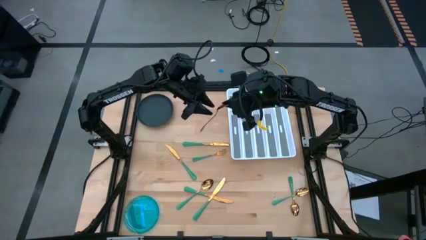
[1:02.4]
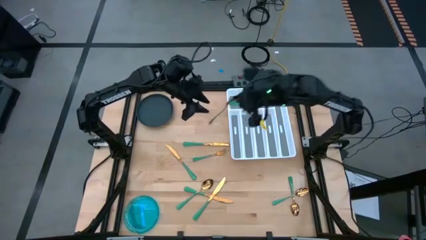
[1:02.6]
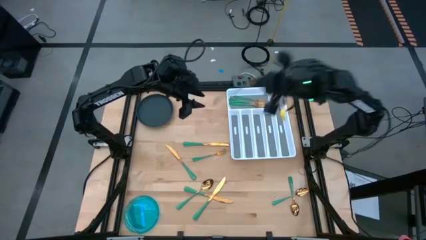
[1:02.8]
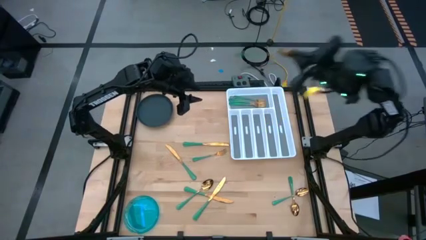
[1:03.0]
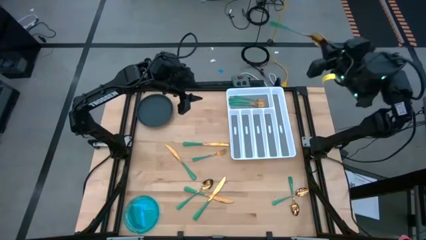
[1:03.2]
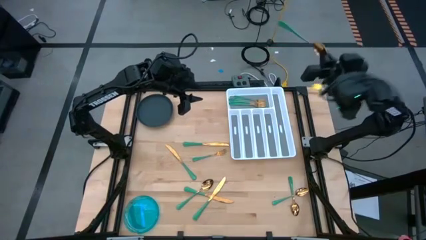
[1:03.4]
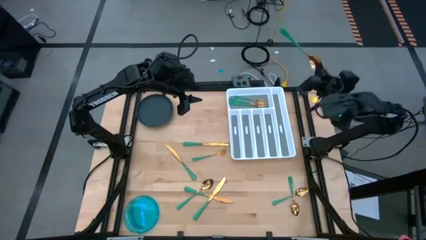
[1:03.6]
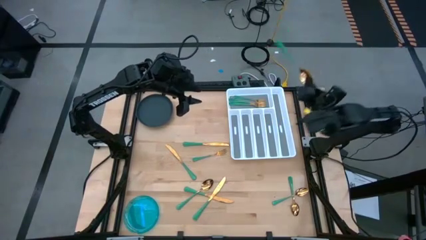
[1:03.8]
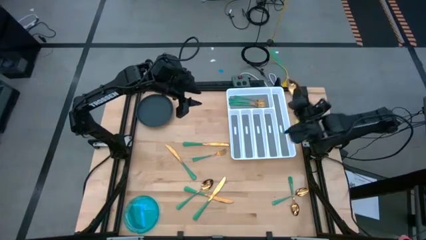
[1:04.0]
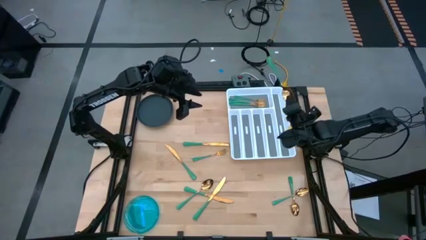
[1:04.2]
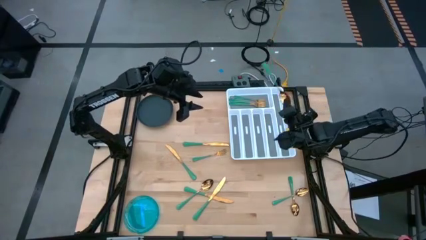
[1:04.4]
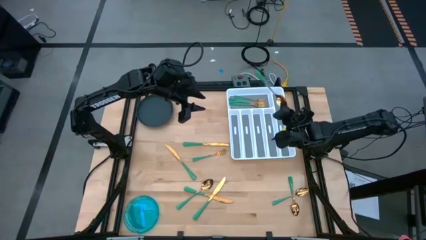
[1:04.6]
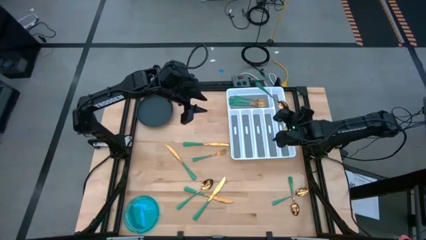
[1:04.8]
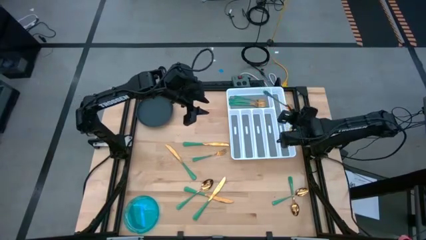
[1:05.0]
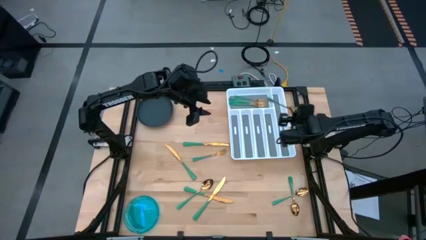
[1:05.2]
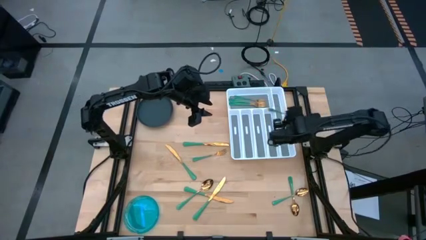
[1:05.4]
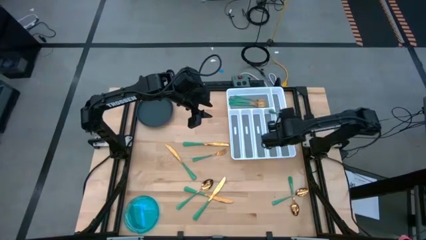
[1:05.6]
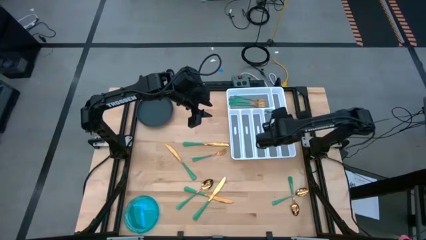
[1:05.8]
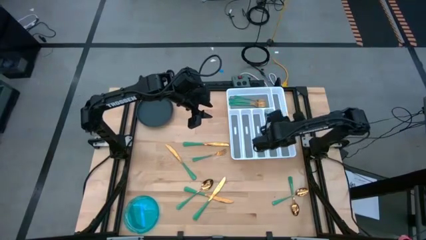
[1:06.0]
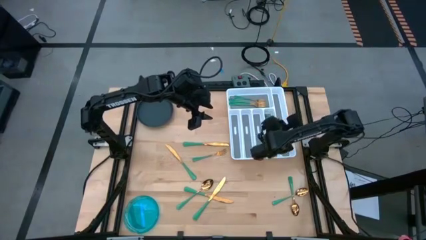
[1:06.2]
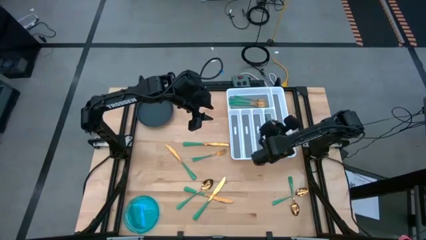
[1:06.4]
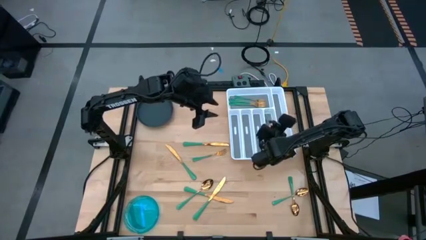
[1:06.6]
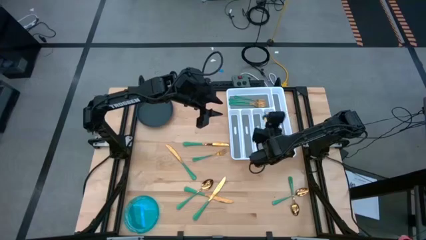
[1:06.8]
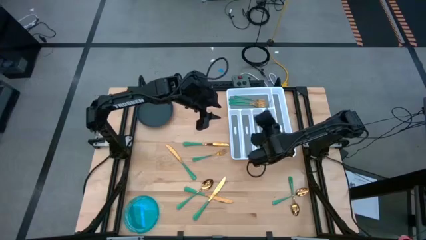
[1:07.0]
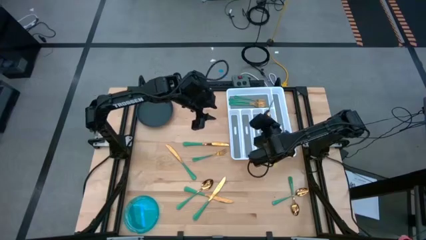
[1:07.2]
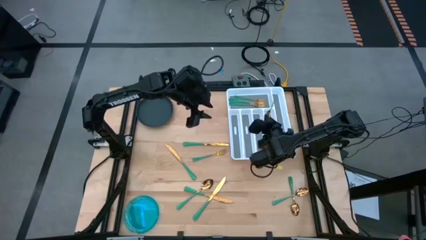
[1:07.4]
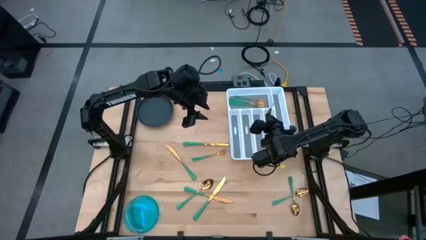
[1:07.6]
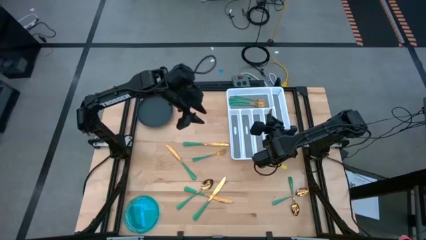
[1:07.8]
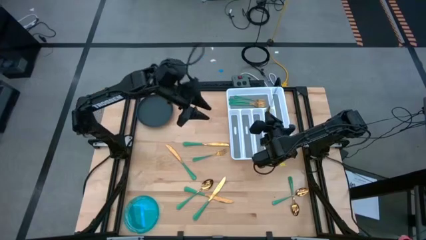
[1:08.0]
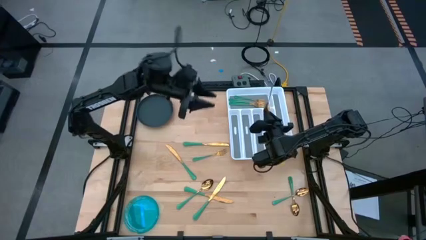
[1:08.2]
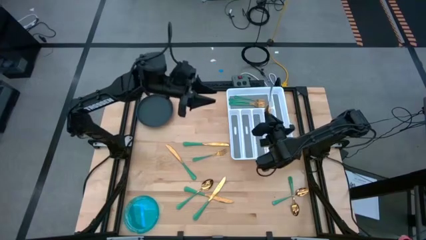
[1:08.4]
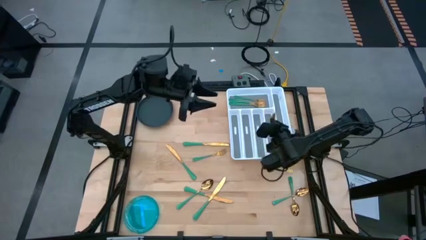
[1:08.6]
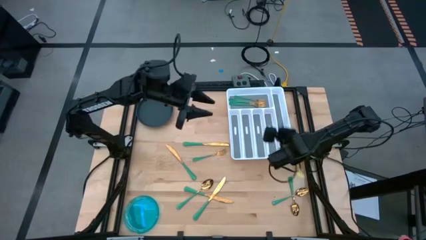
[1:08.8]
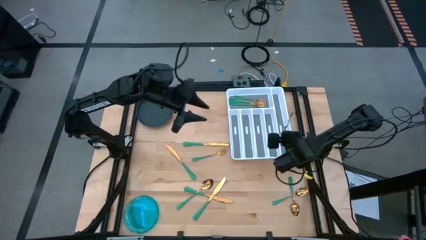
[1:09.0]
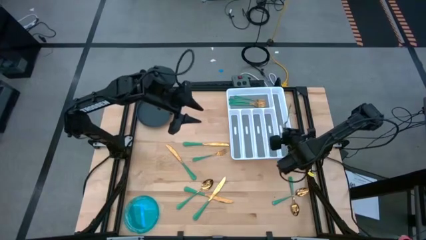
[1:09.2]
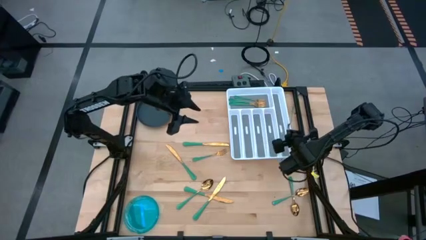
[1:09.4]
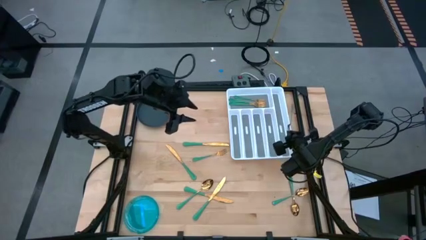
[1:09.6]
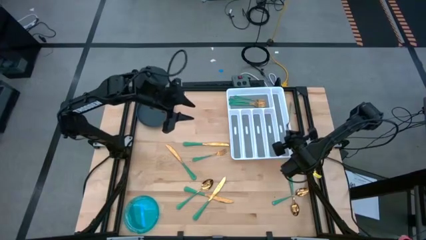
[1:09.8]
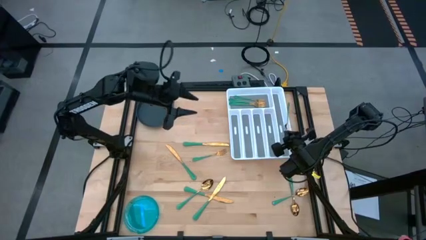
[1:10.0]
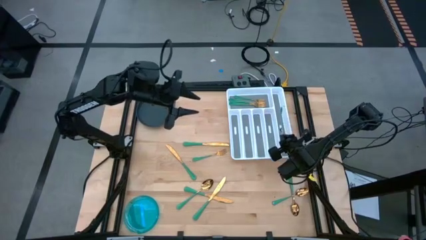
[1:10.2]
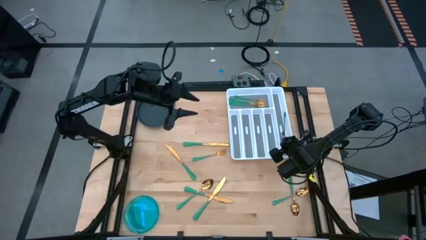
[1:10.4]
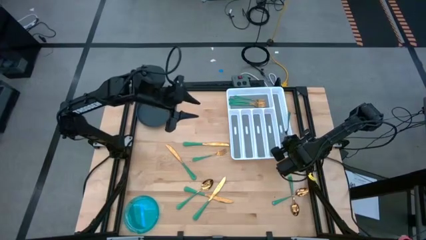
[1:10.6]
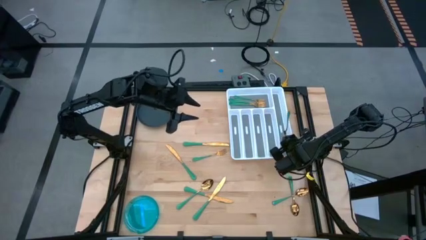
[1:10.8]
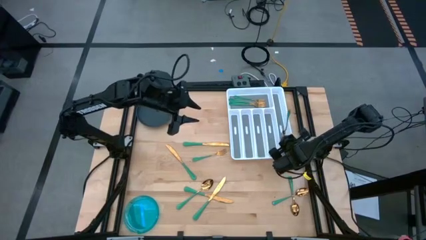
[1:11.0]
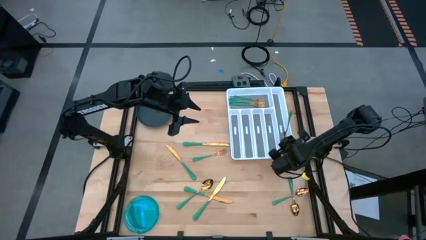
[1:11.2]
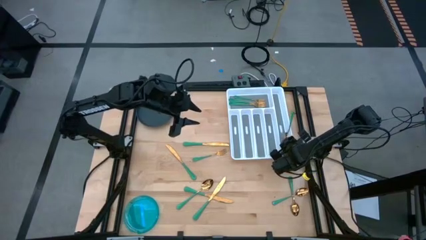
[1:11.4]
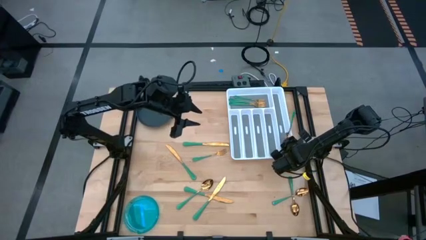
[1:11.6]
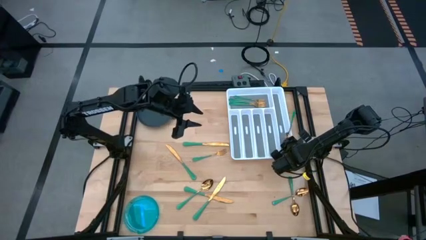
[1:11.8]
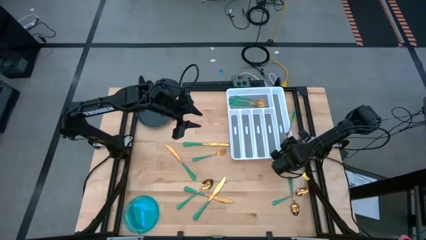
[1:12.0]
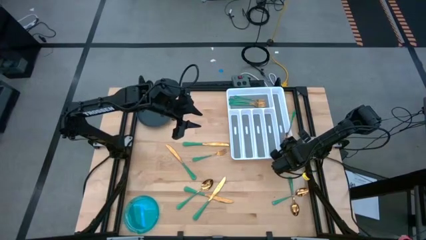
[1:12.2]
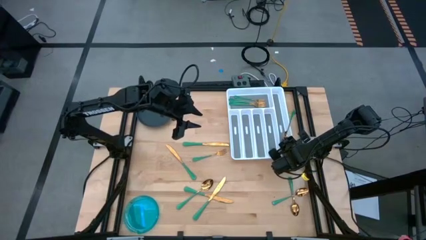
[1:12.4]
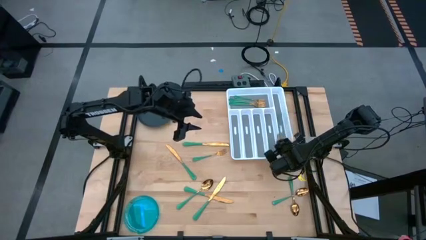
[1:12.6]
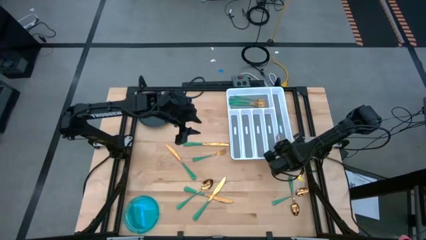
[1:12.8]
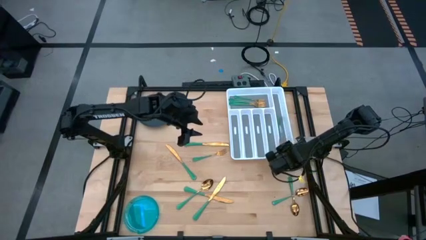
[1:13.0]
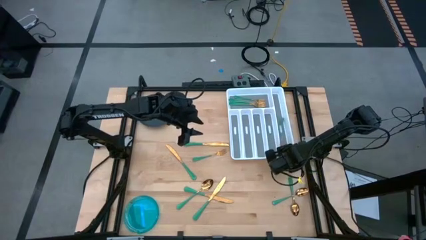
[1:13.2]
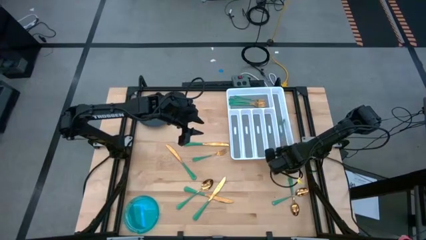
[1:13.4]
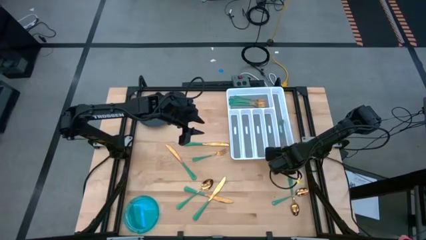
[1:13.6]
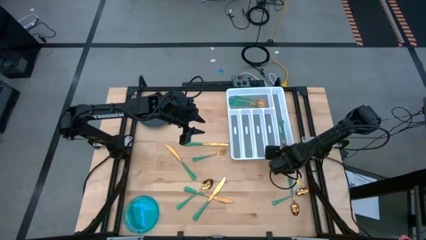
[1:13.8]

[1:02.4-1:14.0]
Task: Sort silverware
Put the green spoon into the silverware tray

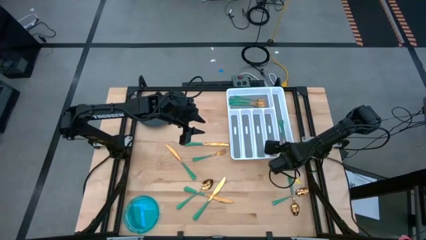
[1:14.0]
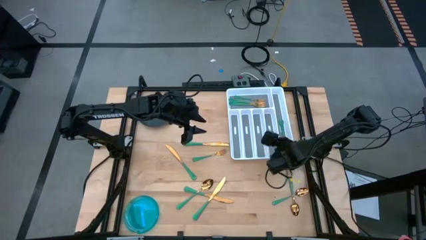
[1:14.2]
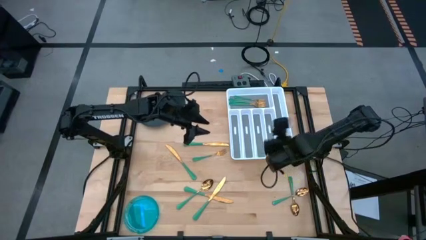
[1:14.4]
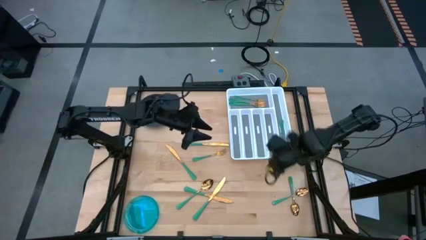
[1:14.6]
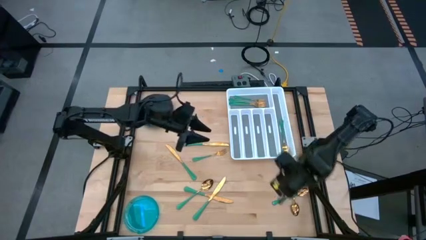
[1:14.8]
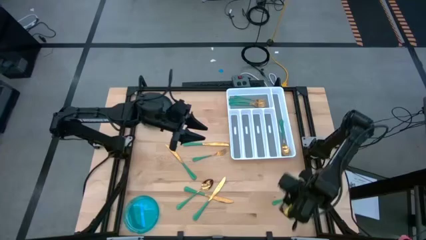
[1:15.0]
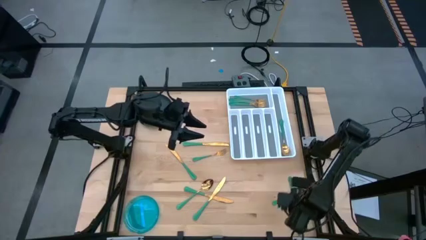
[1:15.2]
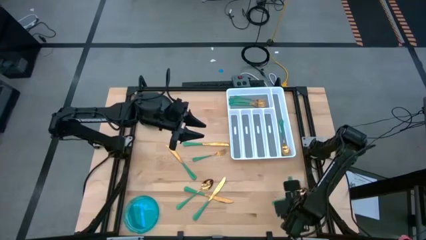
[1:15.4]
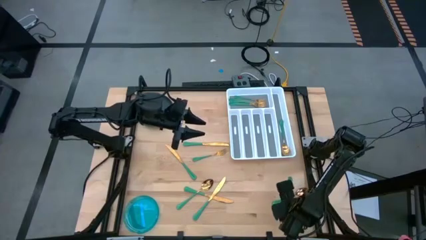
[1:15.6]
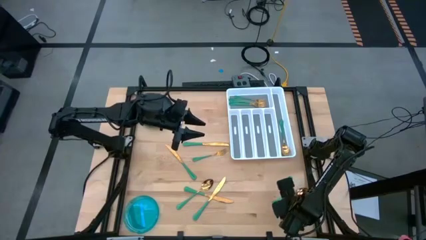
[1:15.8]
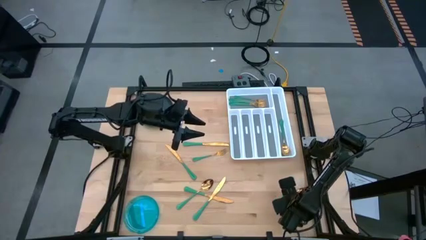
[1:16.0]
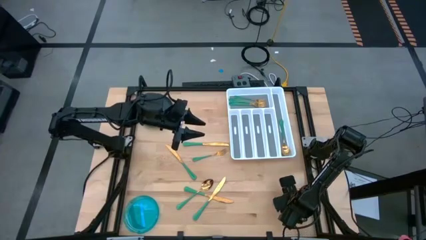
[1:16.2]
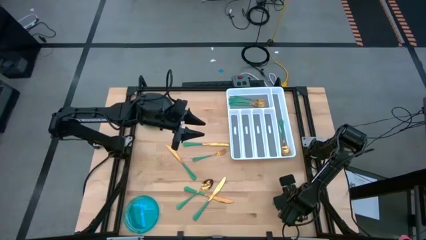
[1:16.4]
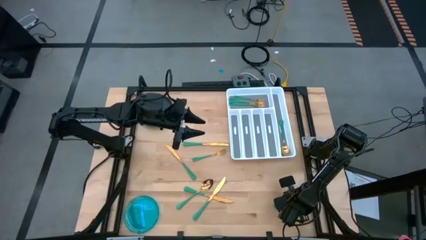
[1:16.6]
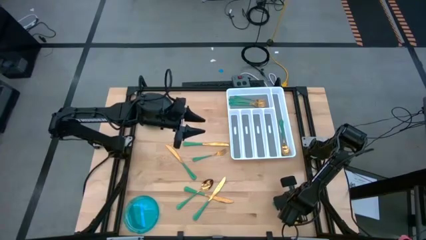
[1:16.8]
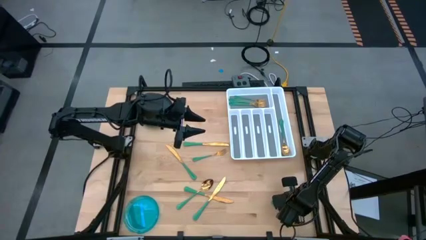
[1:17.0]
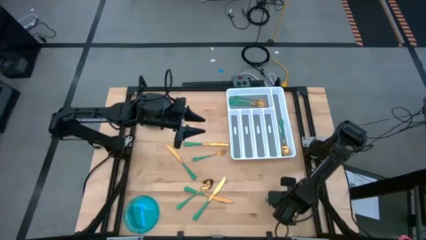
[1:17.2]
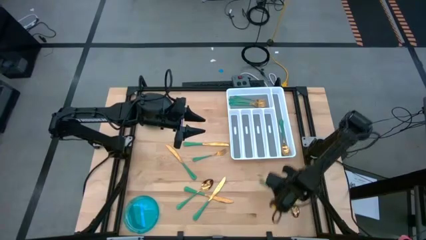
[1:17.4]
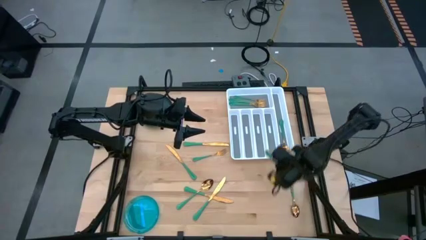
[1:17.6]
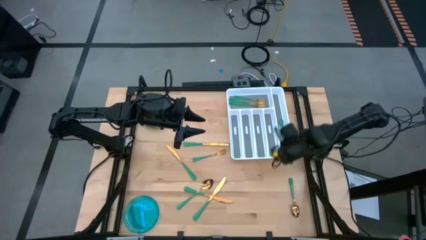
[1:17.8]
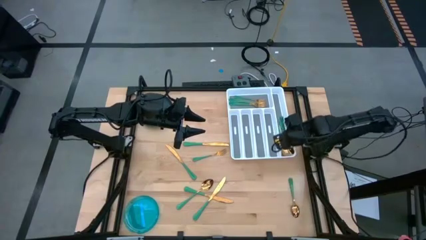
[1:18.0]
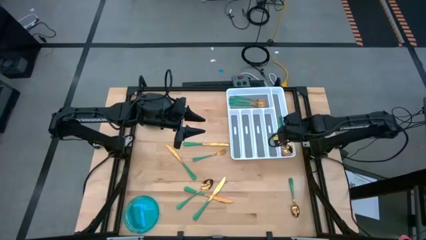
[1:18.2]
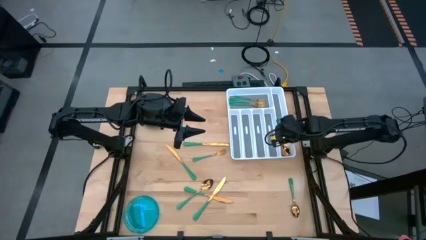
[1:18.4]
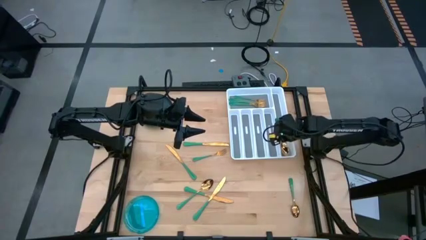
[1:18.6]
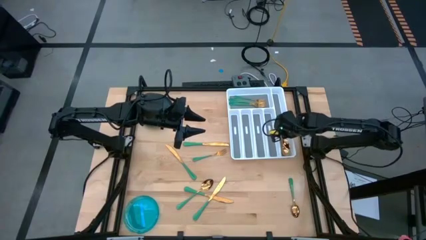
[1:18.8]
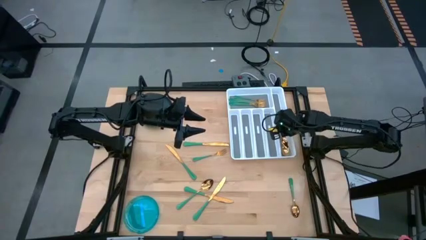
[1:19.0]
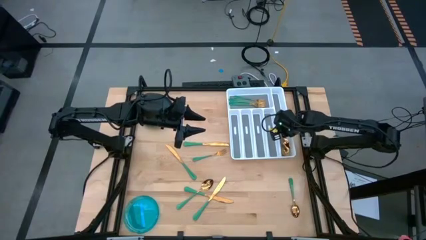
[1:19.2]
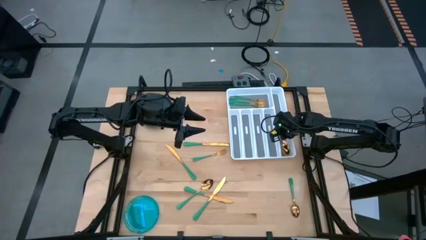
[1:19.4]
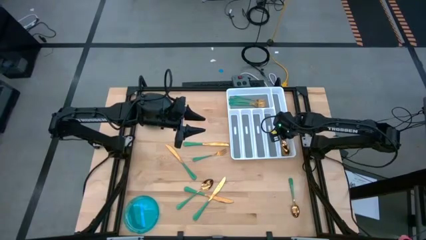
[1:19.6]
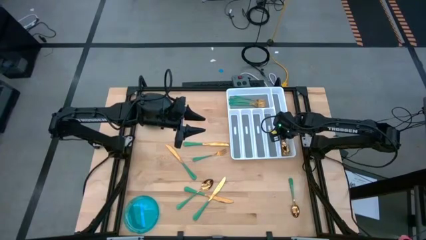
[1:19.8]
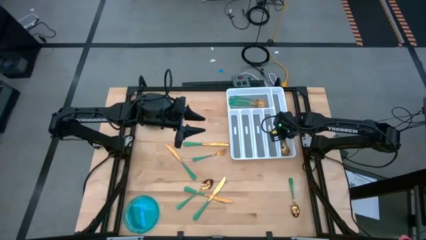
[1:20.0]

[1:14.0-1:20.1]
Put the green spoon into the silverware tray
